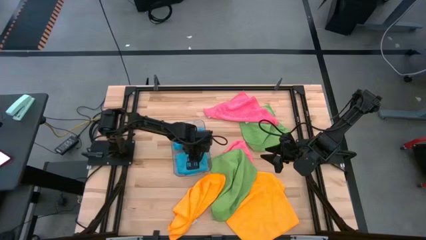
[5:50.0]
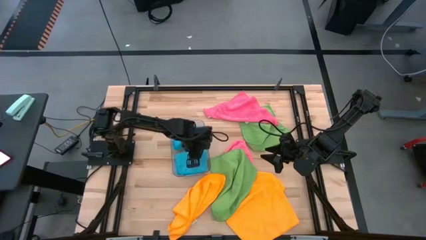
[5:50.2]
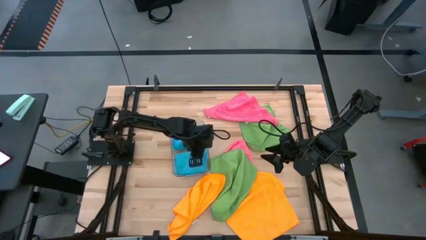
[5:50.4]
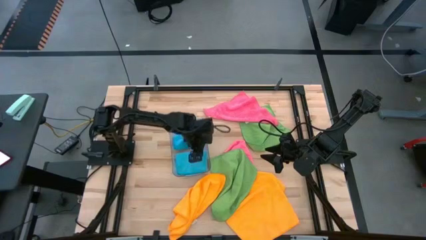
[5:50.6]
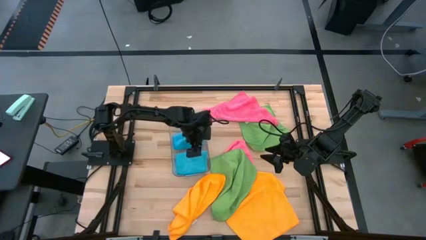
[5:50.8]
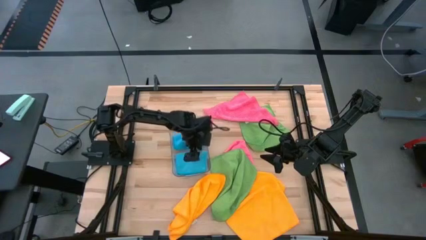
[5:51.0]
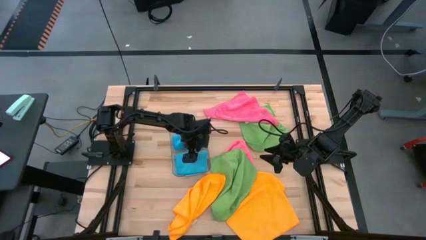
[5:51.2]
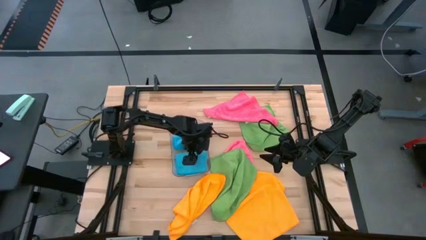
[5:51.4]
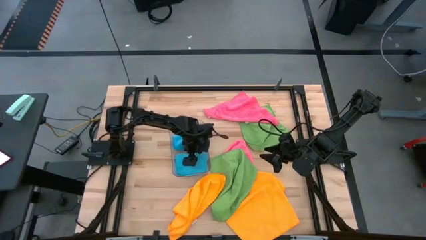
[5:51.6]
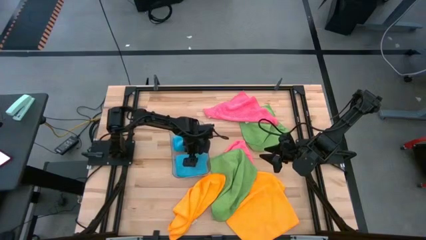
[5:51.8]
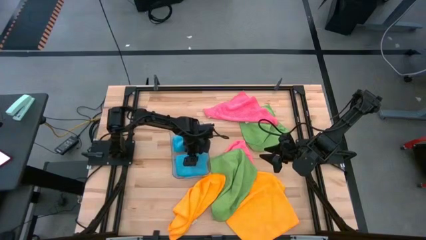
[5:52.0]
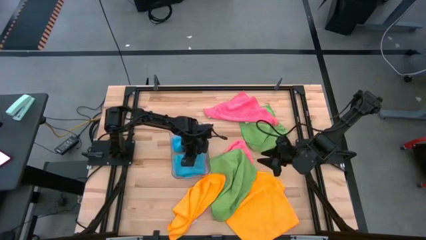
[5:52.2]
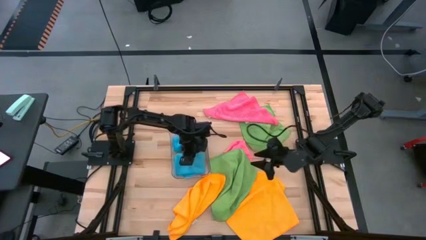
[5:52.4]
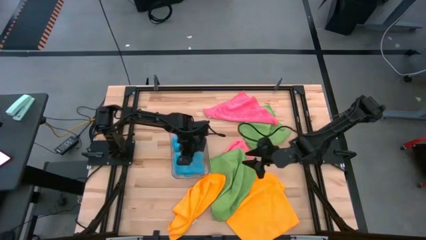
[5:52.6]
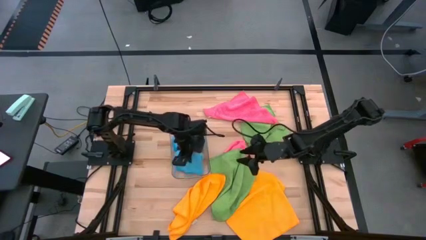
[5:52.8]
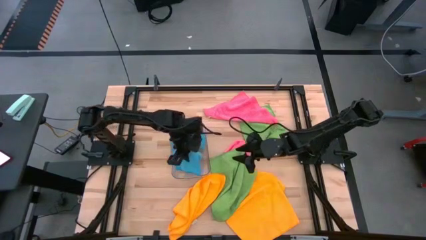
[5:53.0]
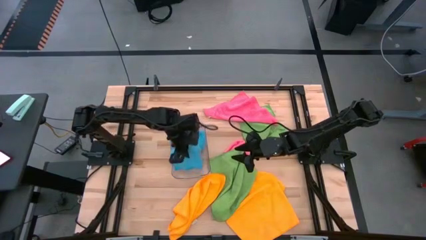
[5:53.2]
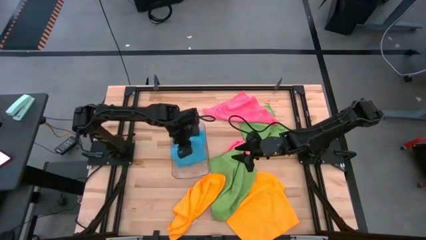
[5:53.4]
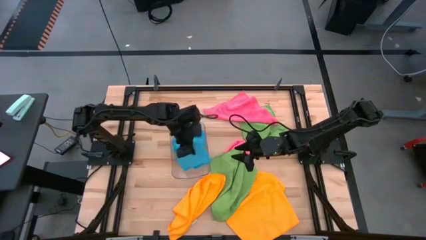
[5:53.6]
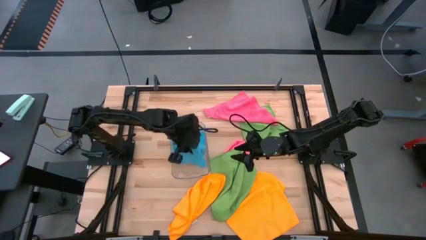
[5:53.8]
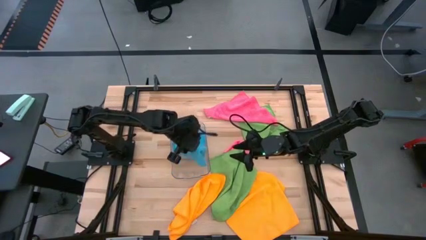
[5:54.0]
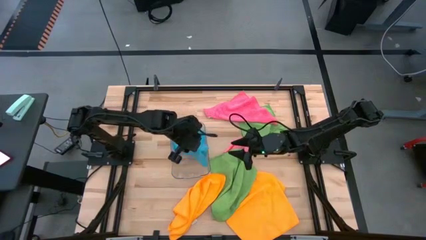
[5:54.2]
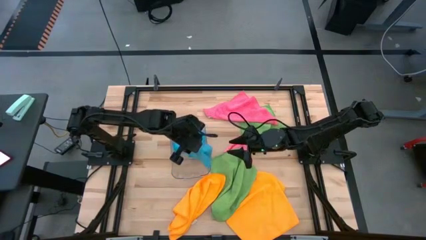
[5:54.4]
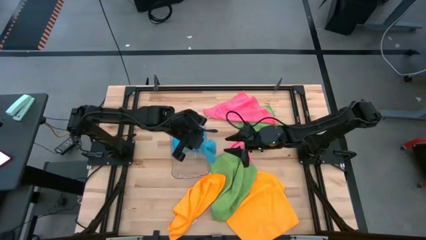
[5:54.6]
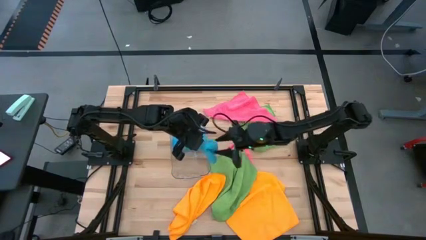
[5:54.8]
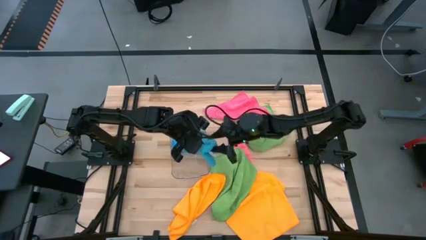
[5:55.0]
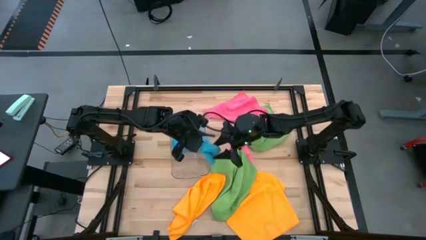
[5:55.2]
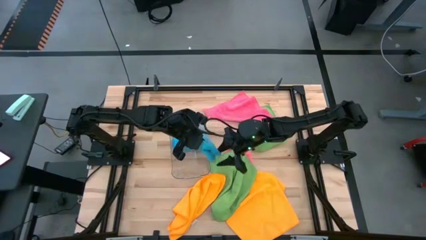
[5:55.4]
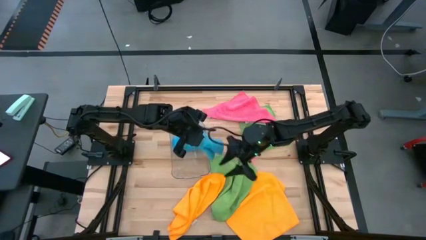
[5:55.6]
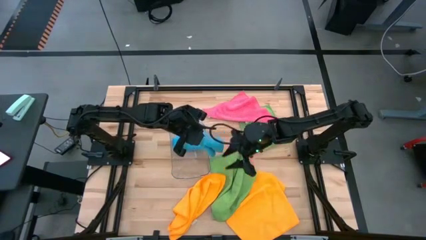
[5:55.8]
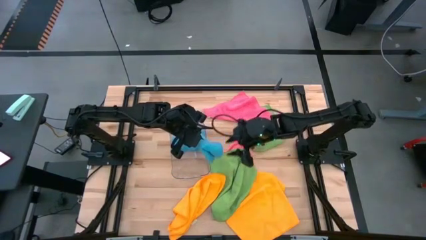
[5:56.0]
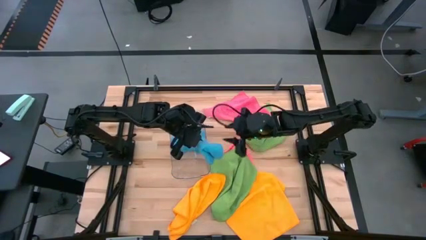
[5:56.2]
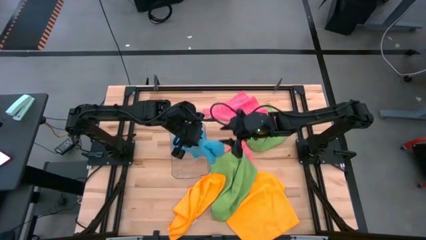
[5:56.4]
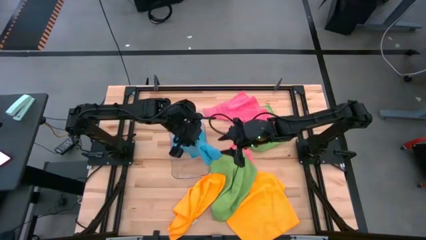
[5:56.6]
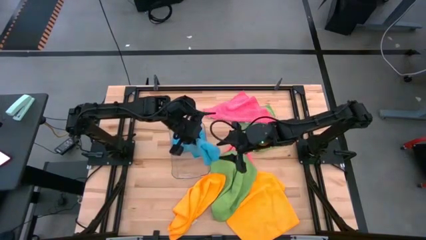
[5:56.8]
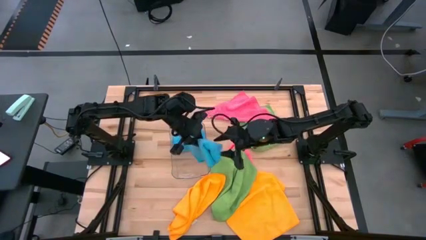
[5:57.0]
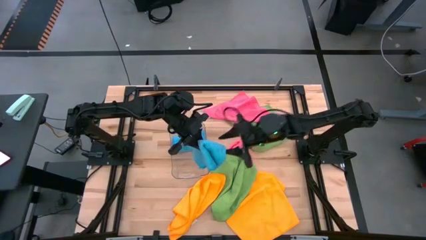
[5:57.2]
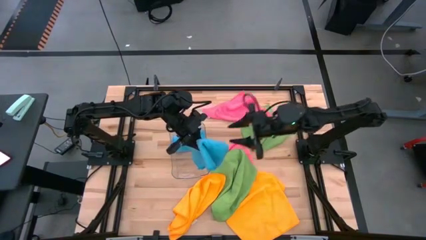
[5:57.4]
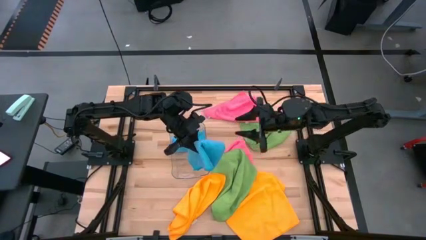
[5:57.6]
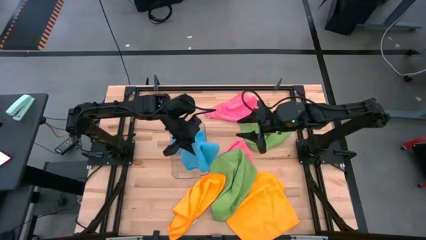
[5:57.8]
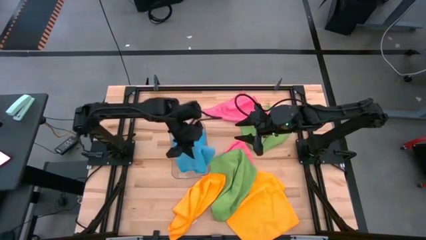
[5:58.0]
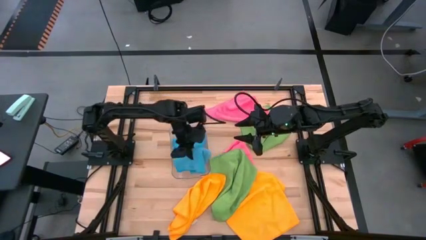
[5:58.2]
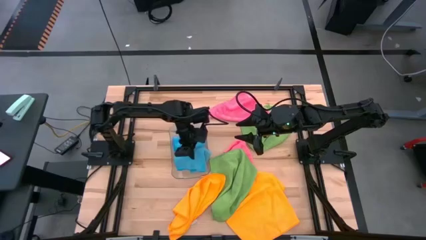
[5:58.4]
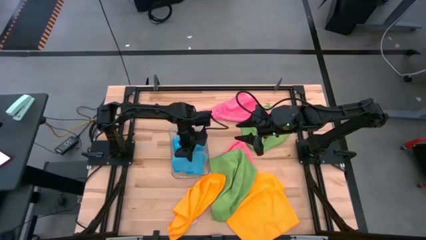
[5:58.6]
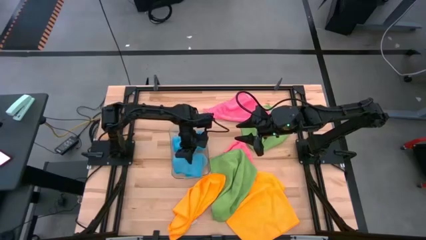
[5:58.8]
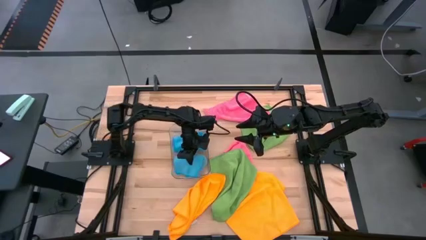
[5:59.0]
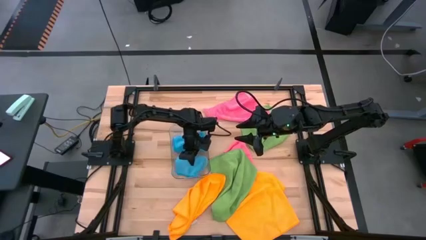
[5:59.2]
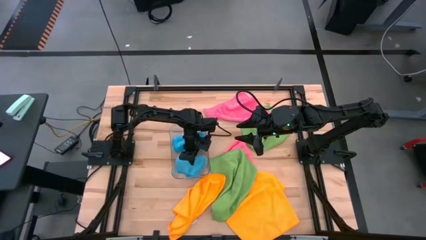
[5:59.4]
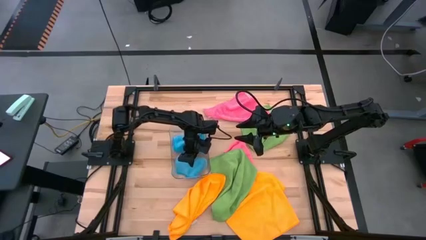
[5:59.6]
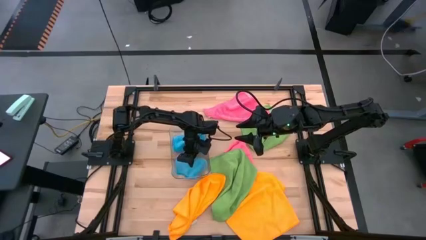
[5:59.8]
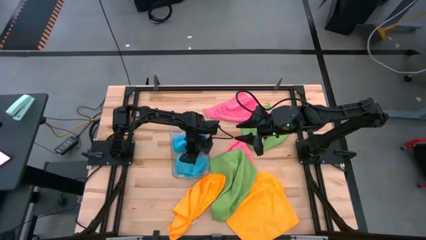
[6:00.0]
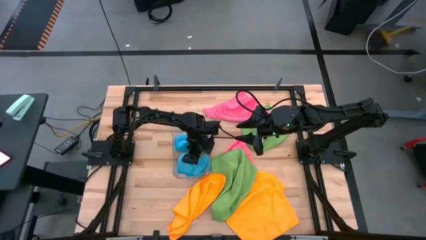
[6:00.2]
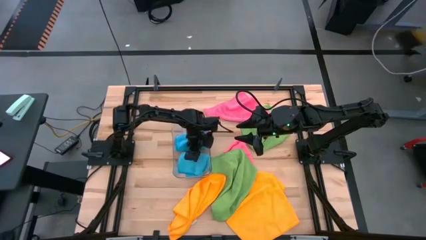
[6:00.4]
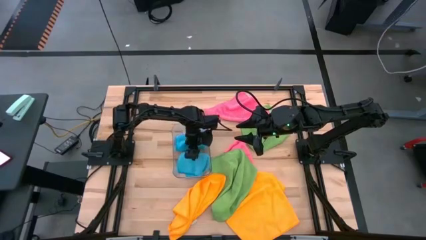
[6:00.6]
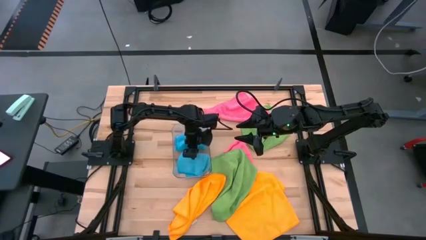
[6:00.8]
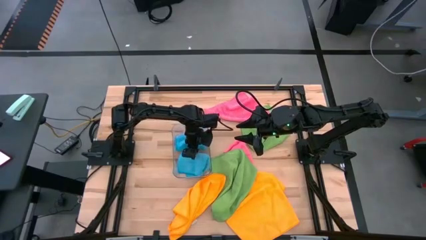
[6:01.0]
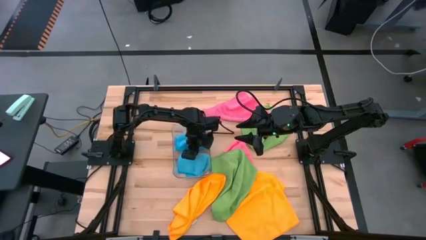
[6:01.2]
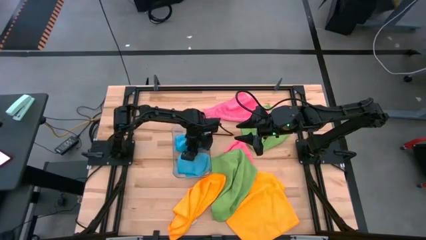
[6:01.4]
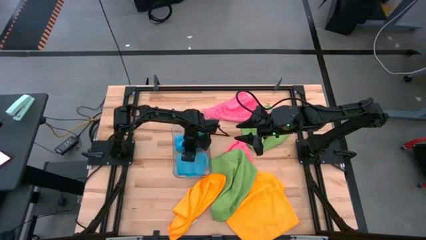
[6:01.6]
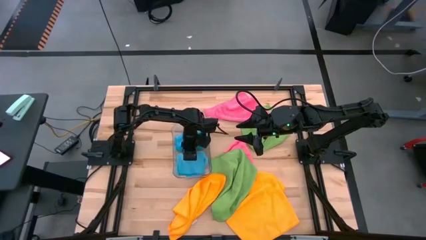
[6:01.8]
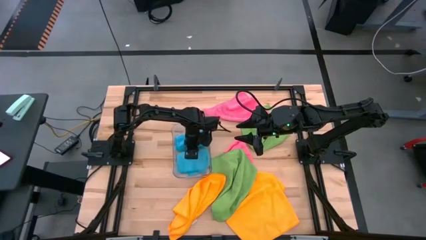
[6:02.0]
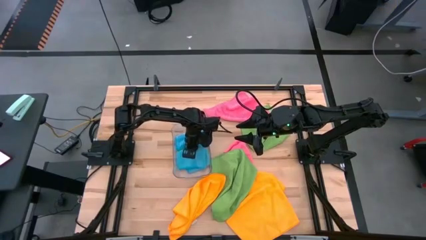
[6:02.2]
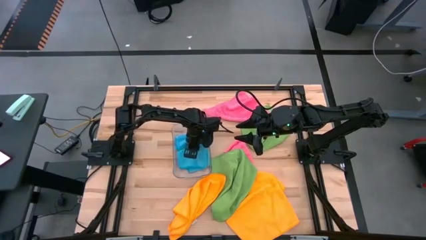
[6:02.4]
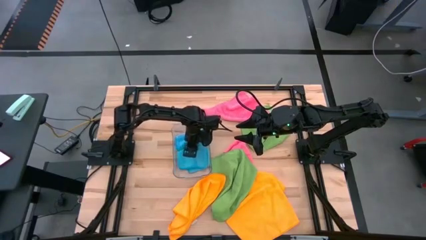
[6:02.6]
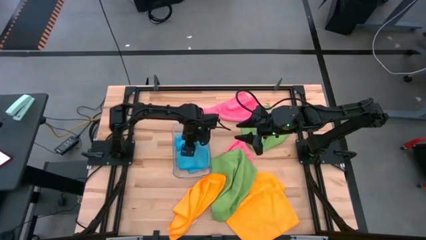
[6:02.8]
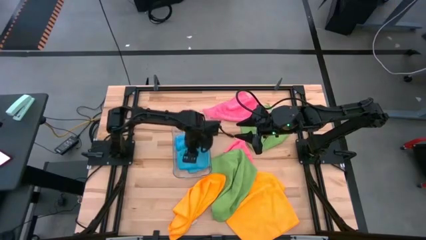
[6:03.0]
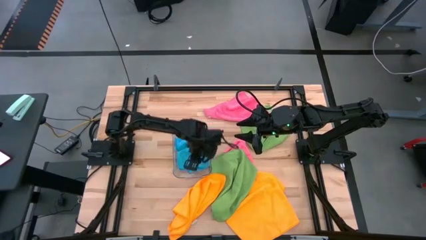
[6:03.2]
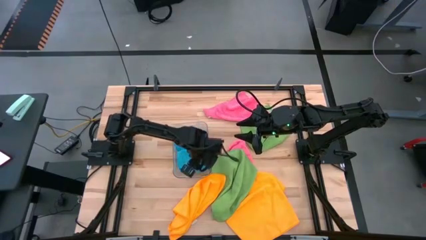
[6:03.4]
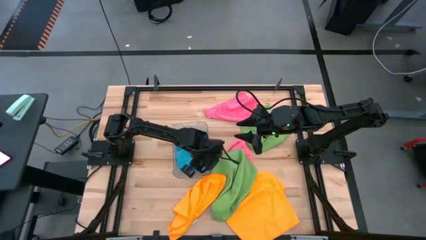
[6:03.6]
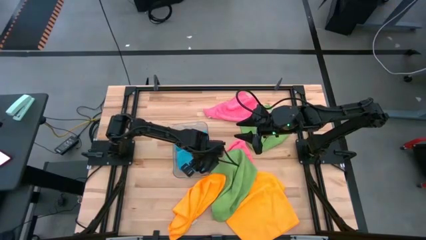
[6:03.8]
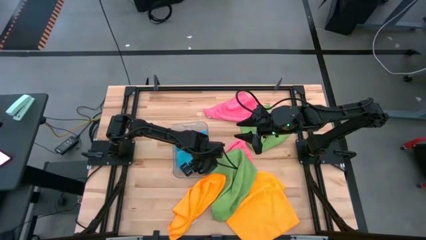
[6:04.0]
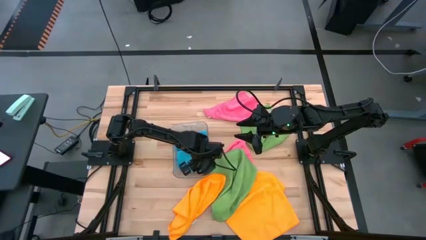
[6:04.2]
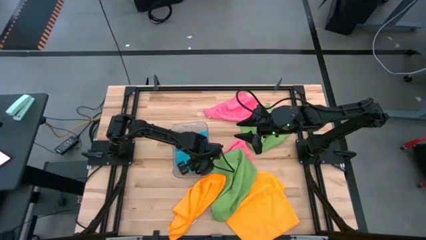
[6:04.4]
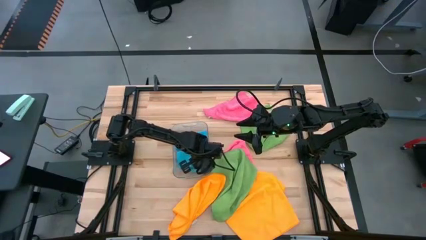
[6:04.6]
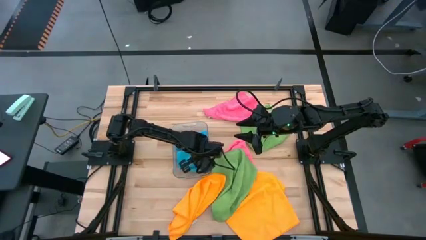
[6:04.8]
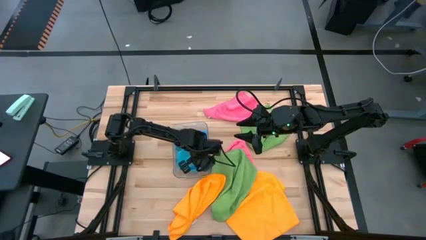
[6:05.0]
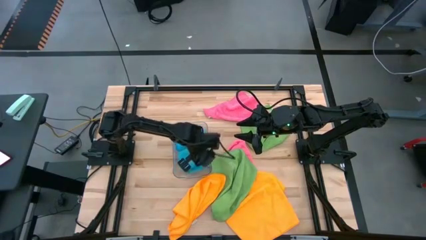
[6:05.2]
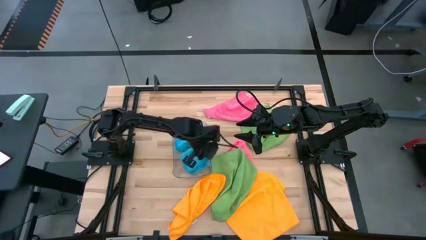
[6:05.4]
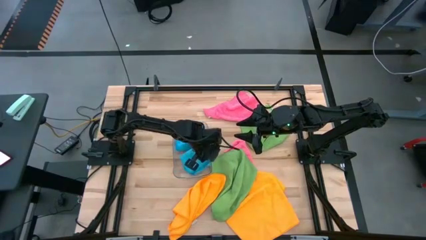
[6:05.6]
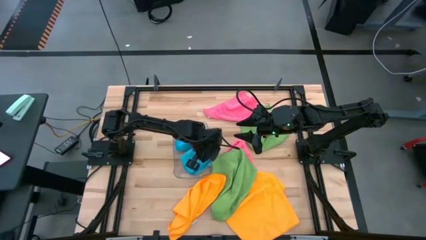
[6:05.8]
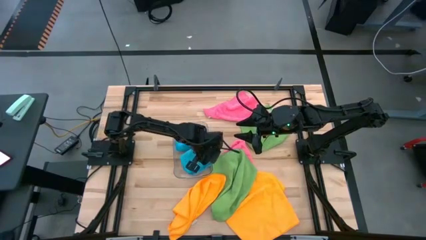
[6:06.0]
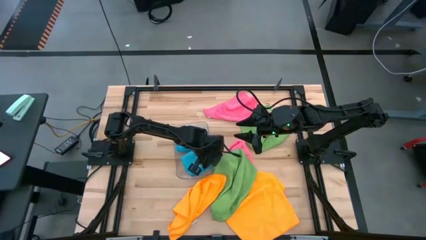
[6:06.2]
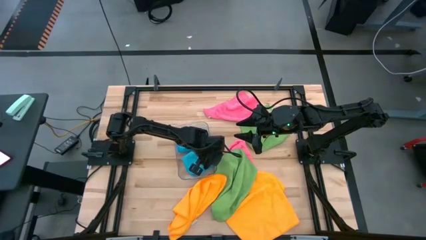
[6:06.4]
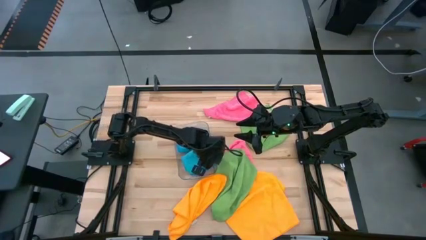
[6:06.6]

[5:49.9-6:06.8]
Task: Fold microfiber towels
Put the blue towel into the transparent bin
